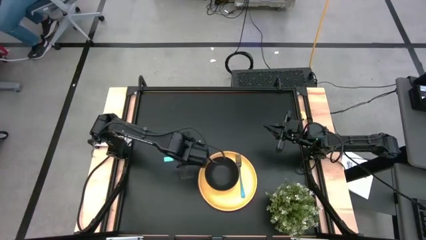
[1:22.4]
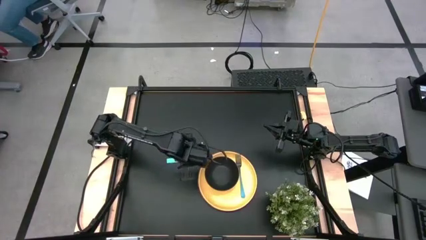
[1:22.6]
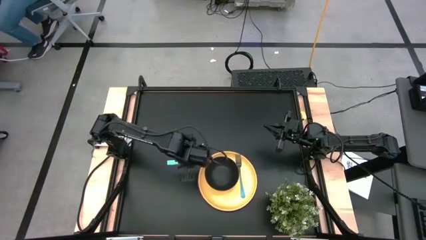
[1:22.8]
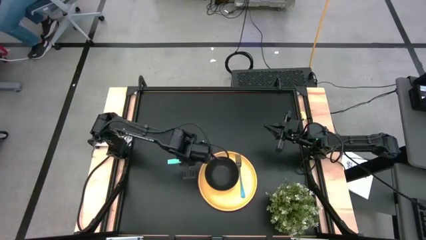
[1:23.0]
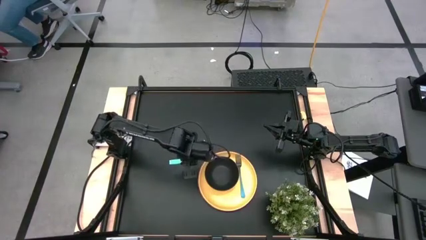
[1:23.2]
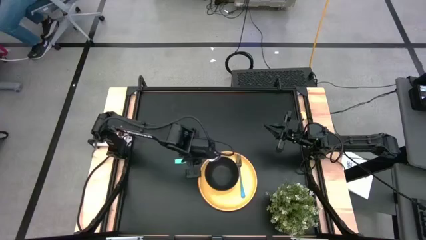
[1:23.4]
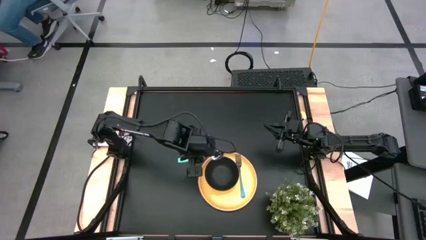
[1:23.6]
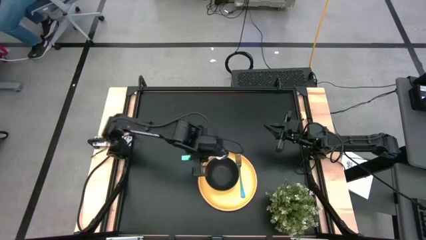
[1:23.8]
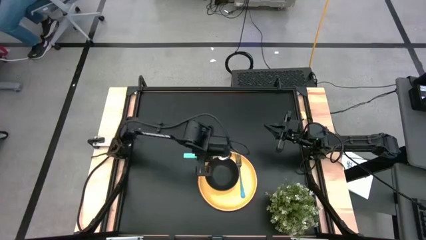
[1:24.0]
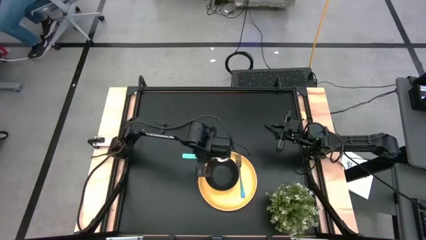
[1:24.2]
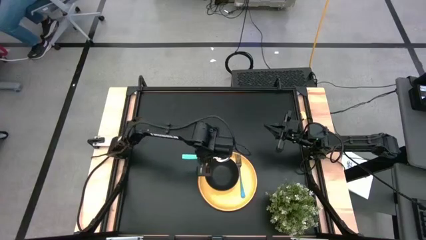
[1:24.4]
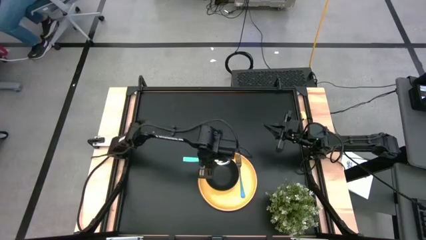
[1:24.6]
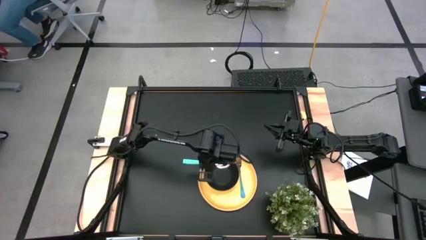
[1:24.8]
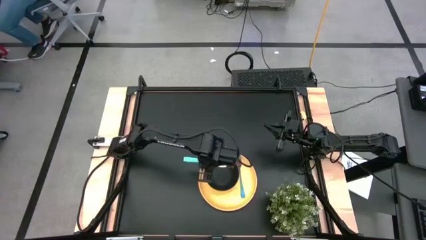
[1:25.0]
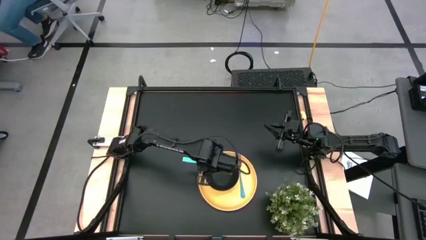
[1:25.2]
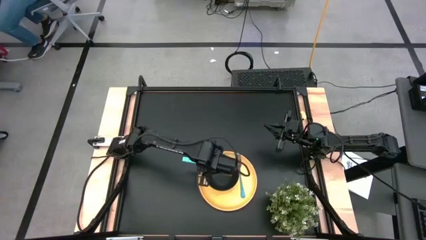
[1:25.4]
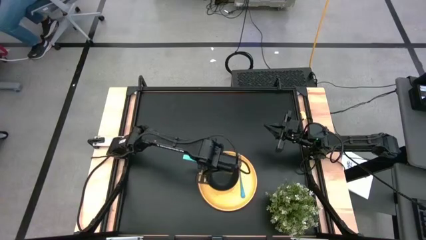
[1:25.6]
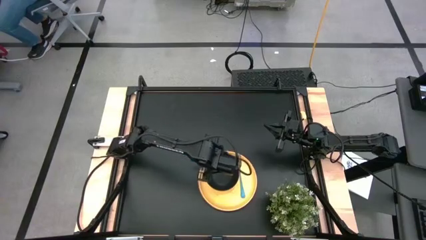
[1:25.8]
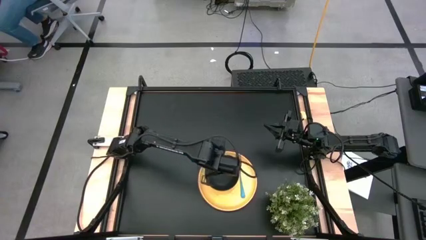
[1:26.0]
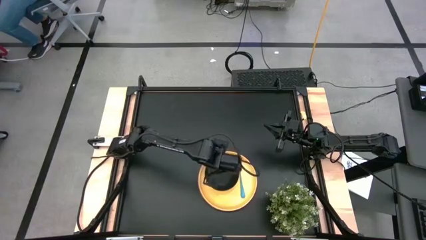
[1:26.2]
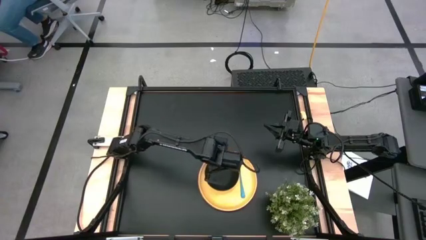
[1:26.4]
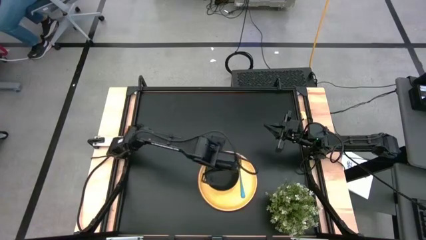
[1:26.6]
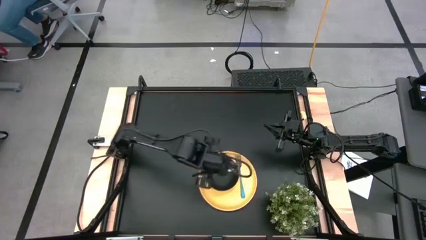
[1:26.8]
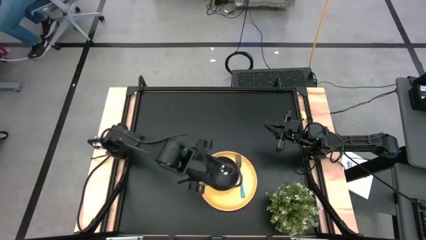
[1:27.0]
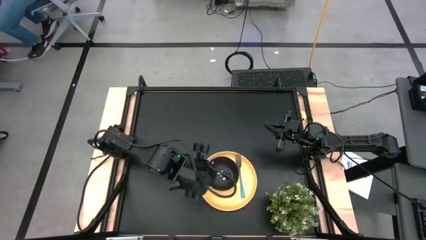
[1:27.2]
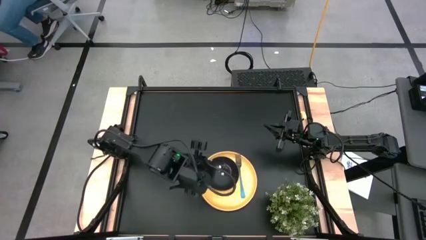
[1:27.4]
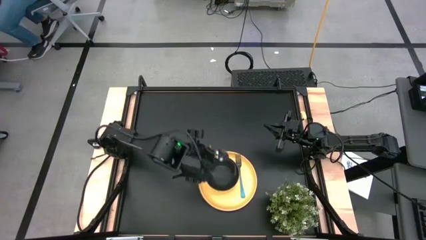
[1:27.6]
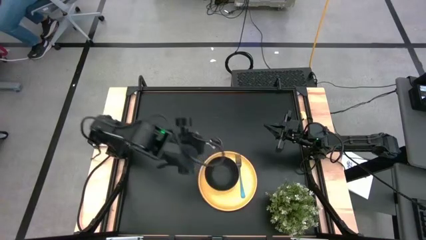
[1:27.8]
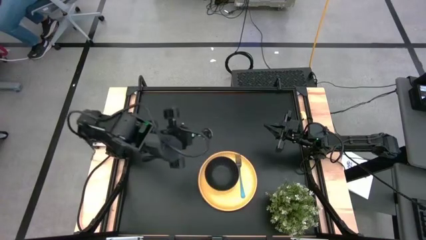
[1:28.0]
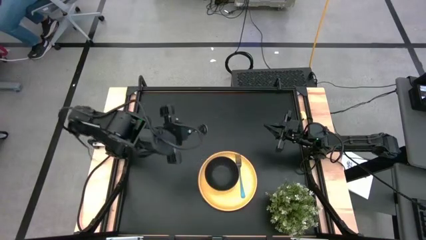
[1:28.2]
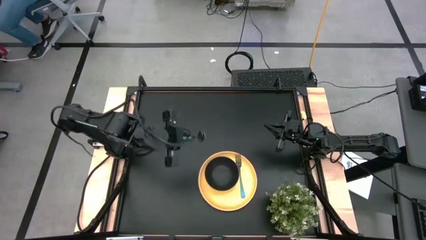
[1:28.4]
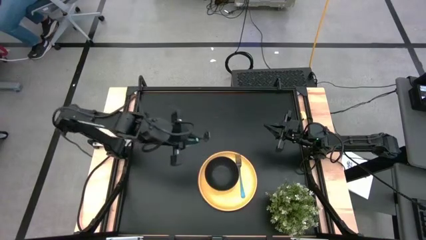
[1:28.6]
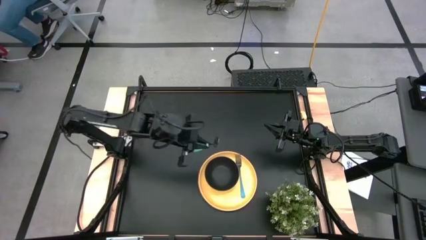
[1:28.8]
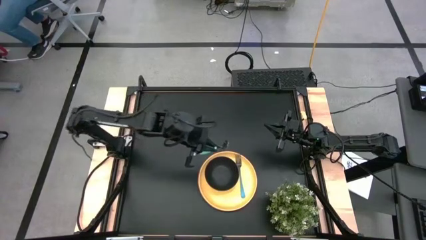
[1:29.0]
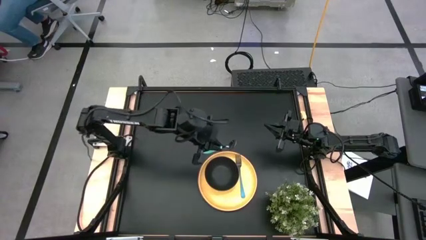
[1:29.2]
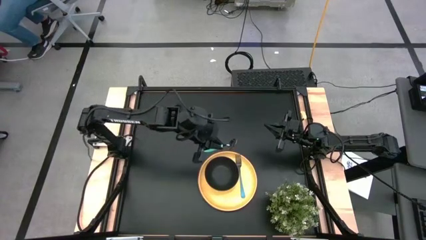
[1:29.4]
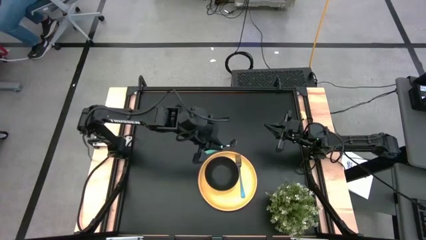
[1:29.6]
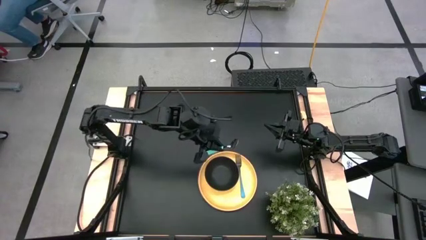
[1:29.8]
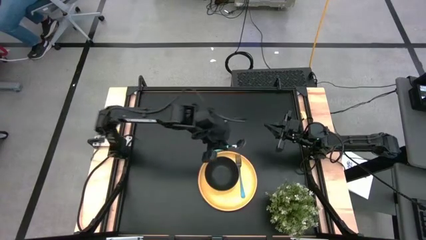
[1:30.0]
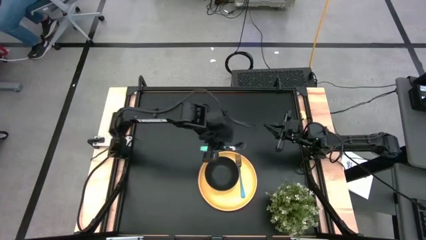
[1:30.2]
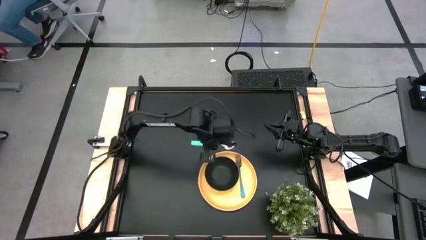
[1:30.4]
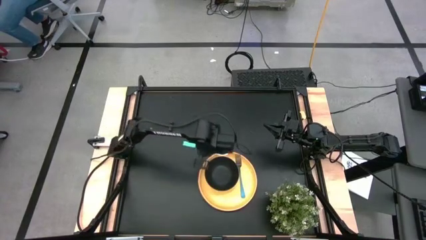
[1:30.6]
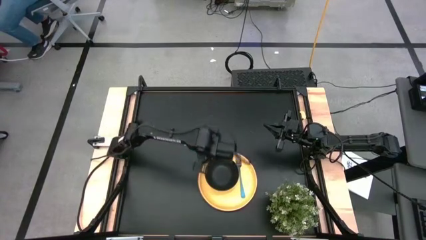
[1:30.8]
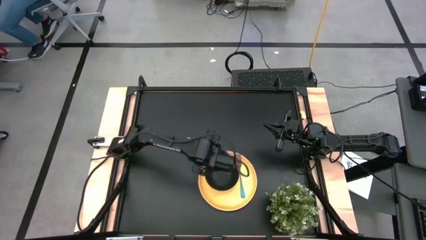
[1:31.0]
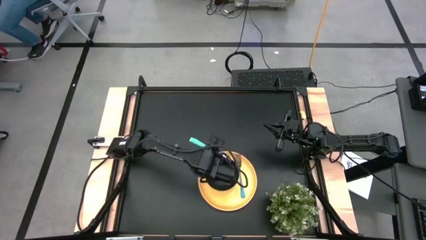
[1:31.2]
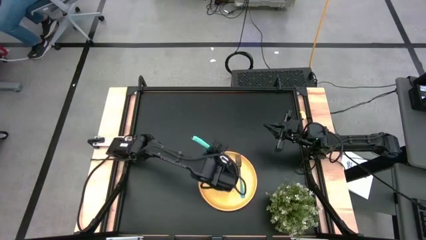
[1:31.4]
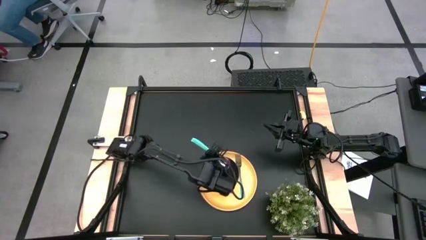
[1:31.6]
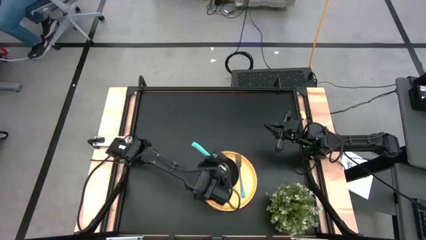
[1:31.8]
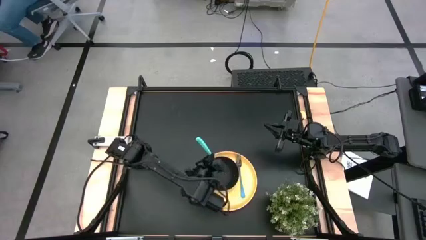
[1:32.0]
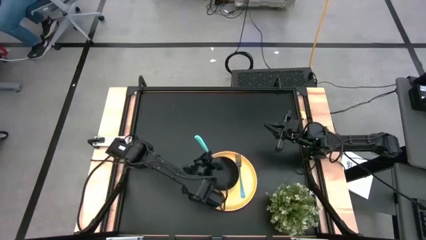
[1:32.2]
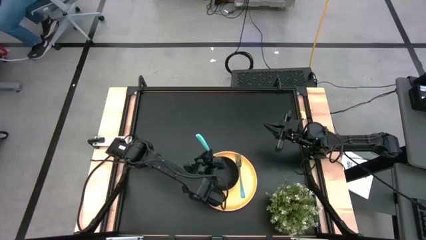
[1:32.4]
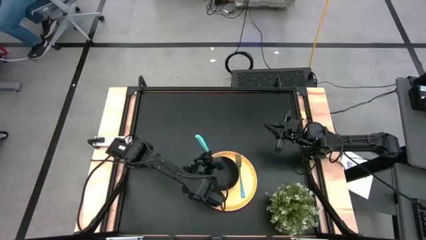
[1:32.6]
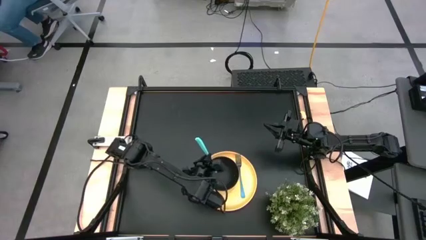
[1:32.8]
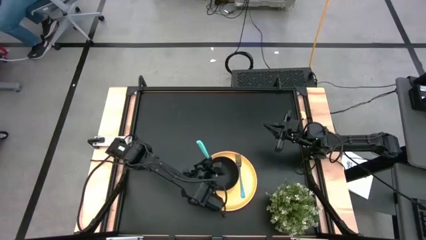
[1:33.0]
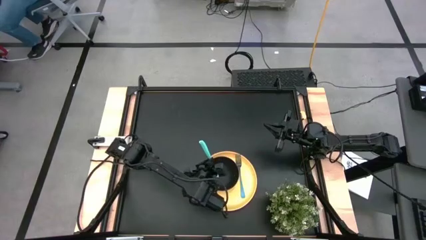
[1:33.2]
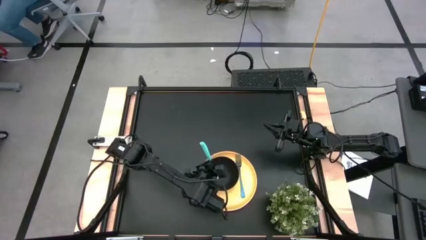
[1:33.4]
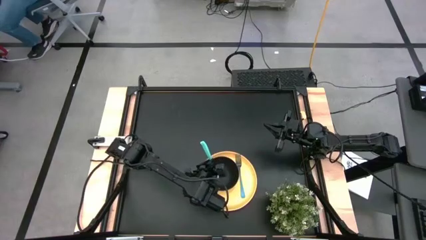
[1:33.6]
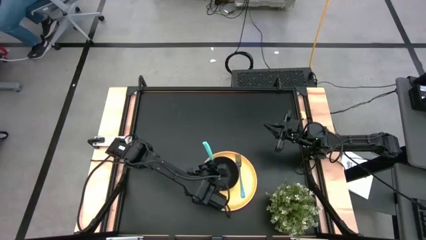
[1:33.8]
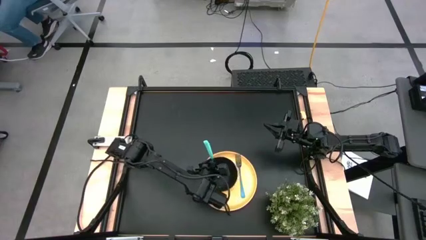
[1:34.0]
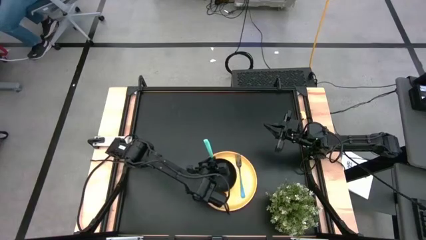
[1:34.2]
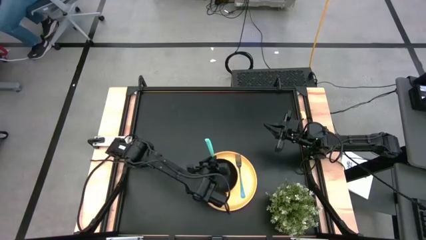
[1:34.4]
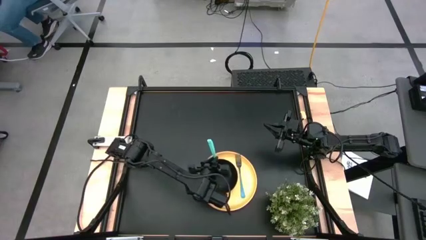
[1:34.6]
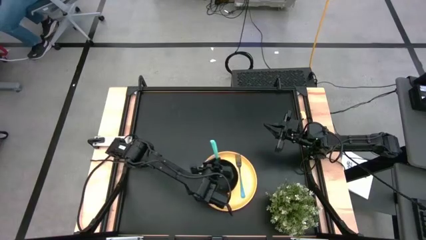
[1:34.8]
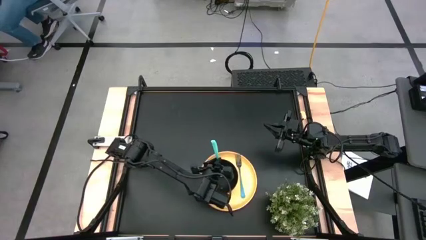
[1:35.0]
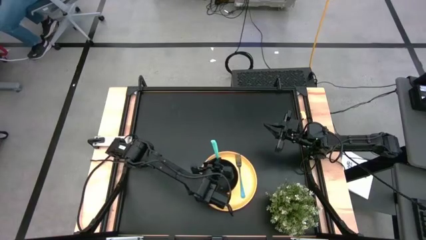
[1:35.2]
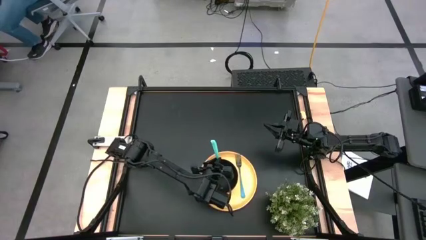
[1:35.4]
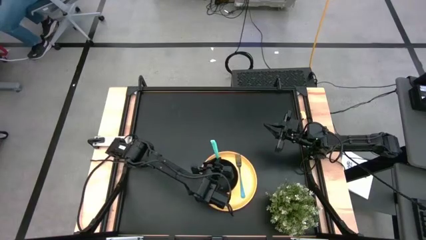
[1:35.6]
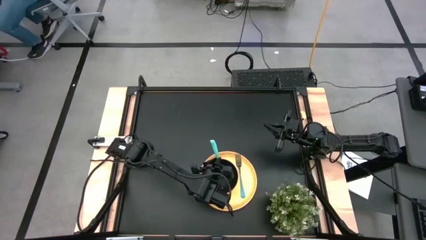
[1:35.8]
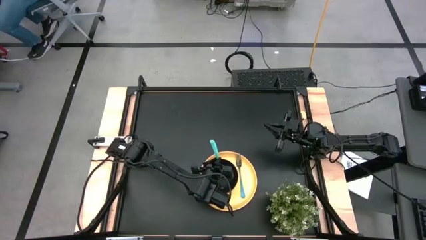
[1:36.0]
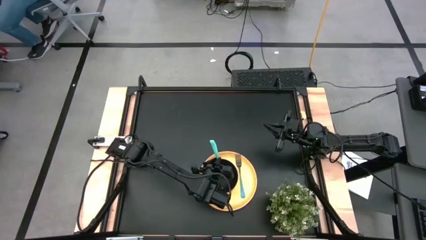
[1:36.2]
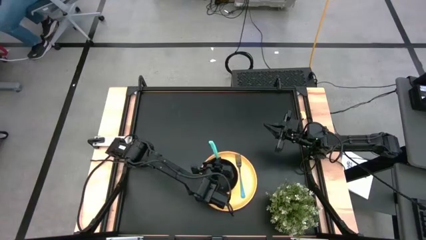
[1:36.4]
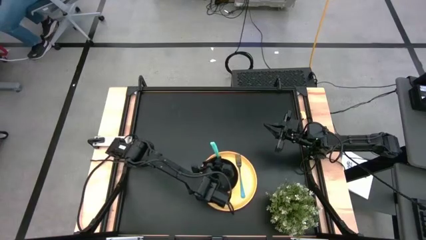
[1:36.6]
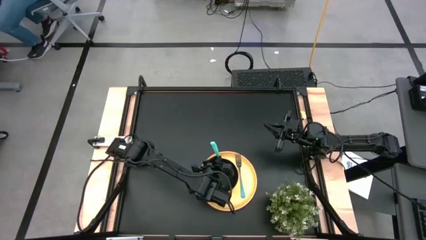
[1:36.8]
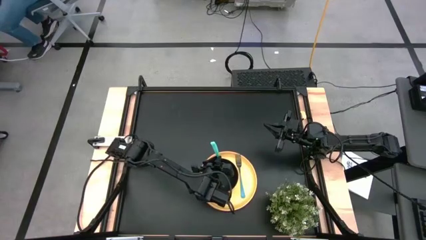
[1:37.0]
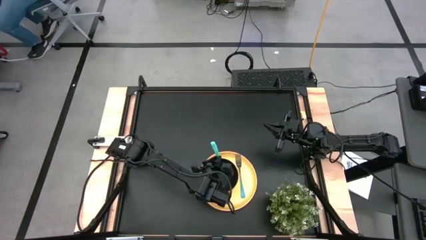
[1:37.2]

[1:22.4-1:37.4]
Task: Pick and place plate/cup/fork/spoon on tray
Put the blue spoon into the black bowl
